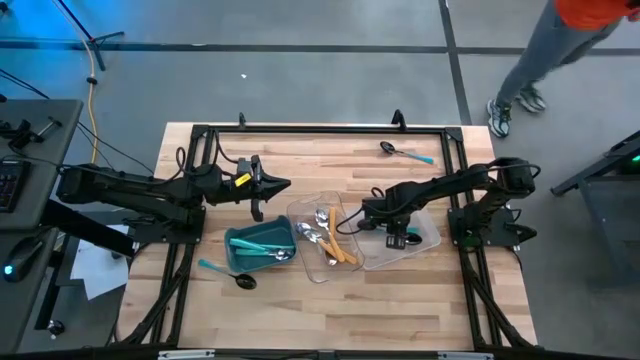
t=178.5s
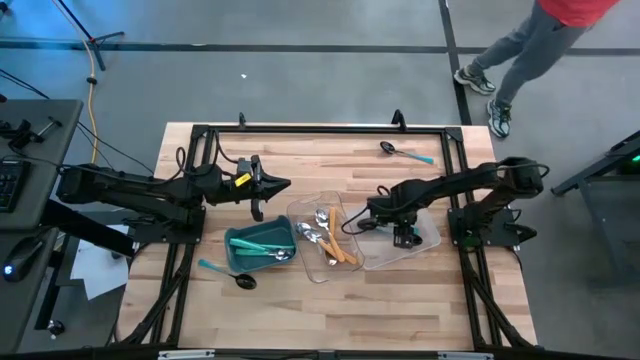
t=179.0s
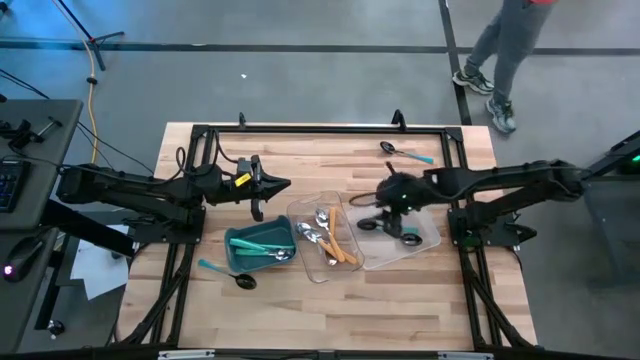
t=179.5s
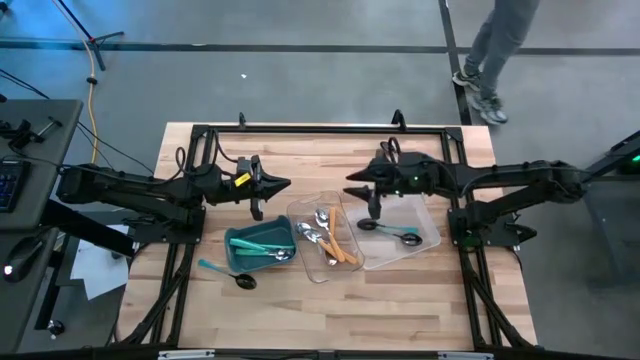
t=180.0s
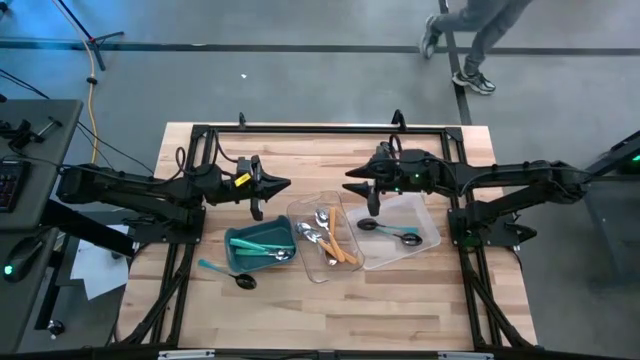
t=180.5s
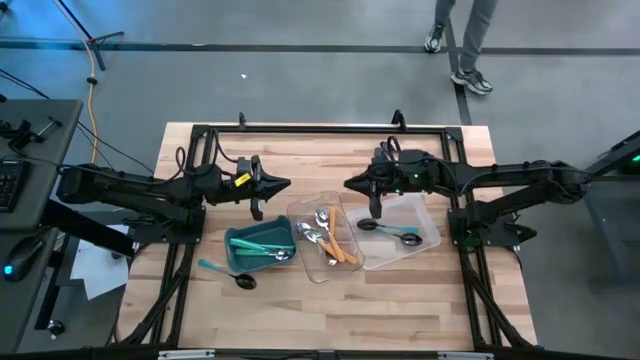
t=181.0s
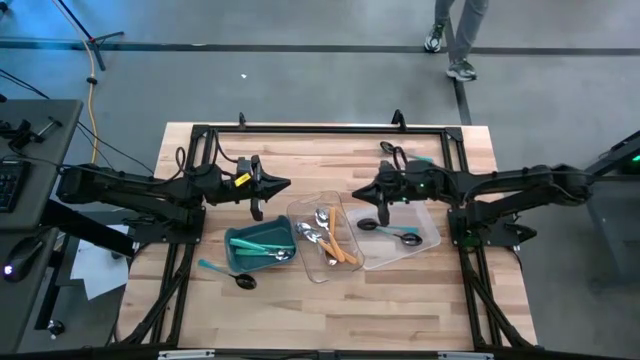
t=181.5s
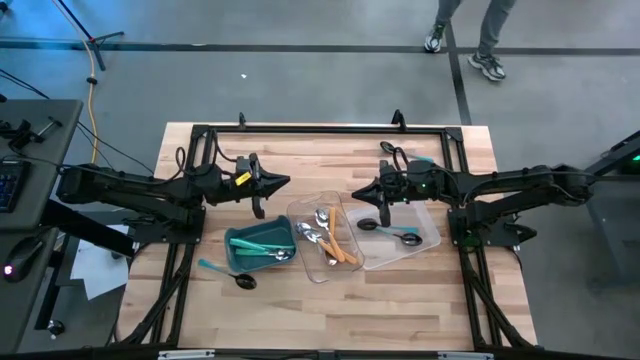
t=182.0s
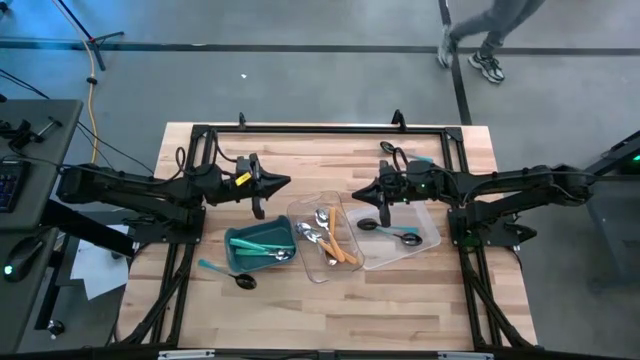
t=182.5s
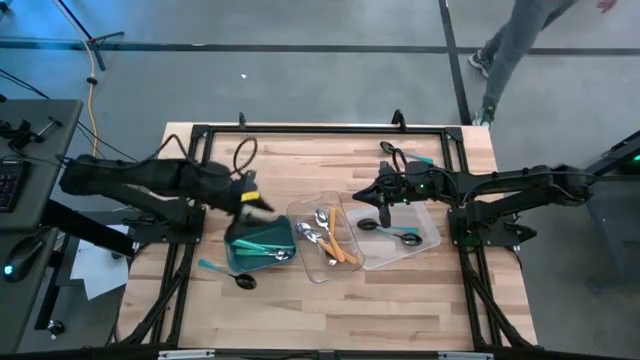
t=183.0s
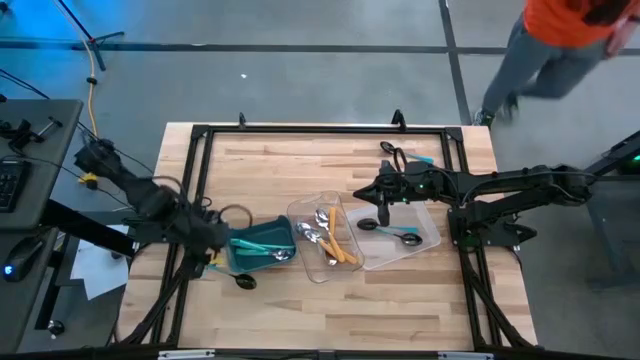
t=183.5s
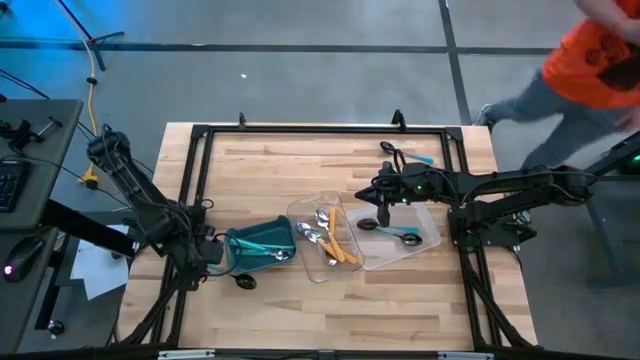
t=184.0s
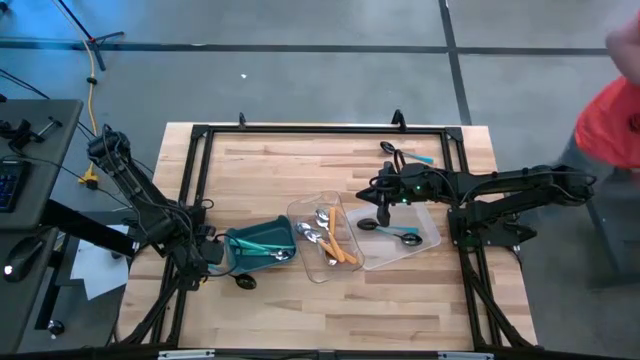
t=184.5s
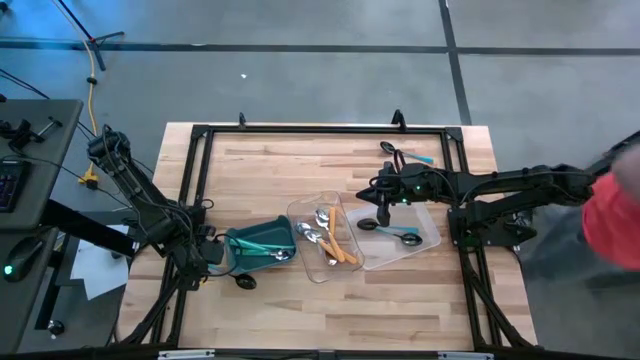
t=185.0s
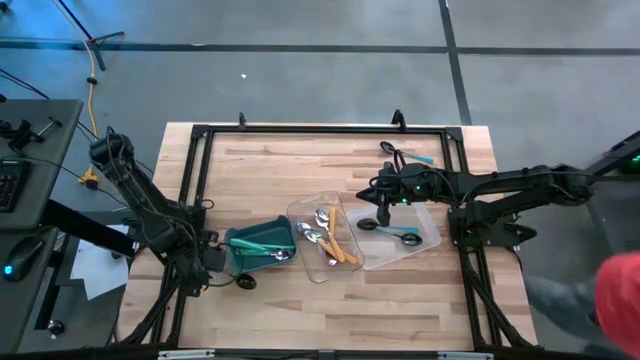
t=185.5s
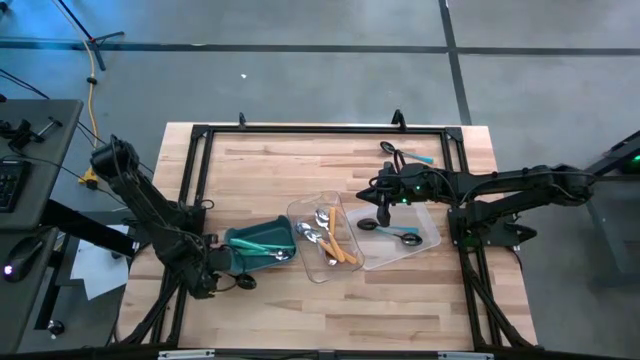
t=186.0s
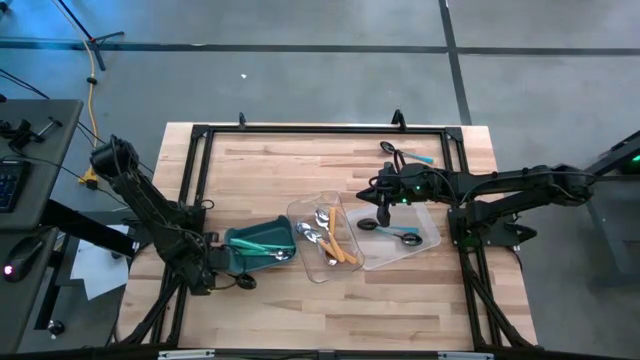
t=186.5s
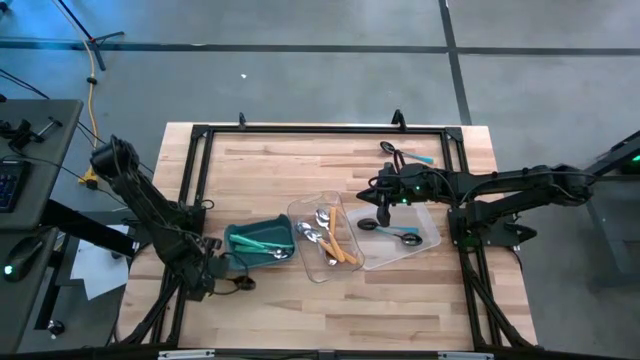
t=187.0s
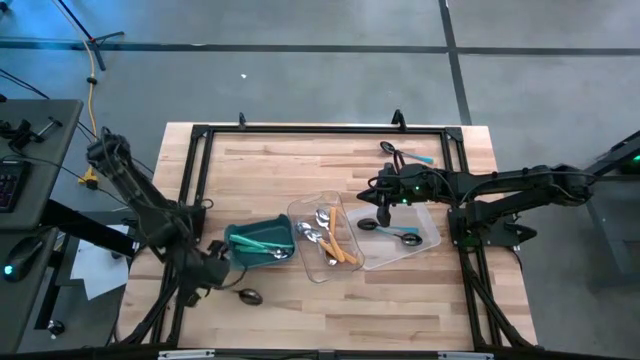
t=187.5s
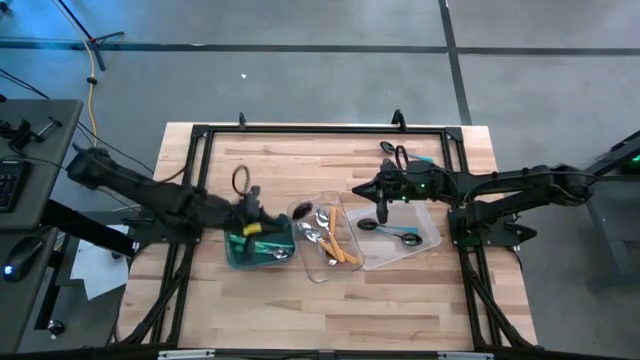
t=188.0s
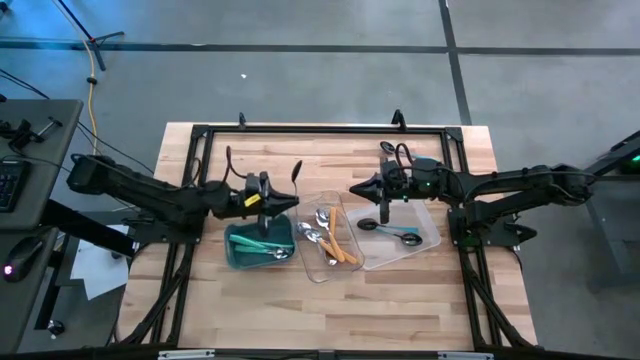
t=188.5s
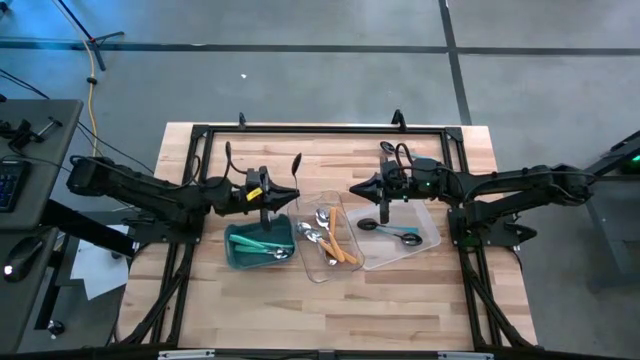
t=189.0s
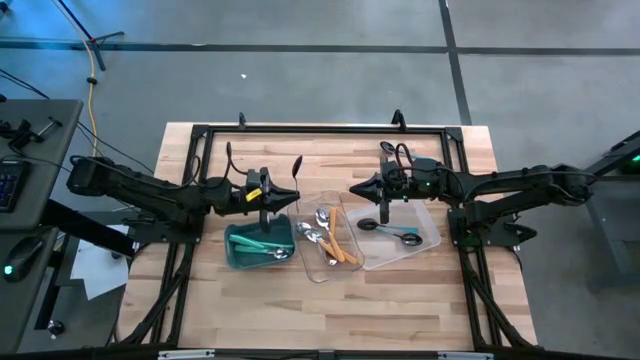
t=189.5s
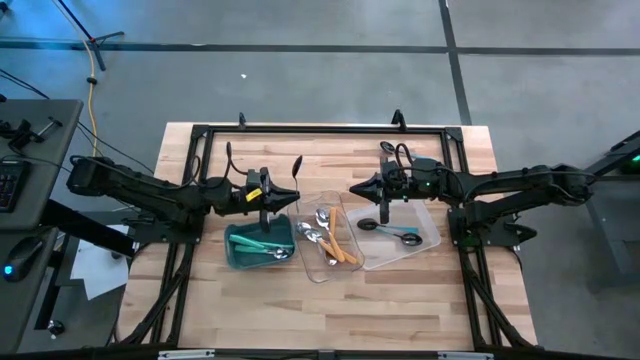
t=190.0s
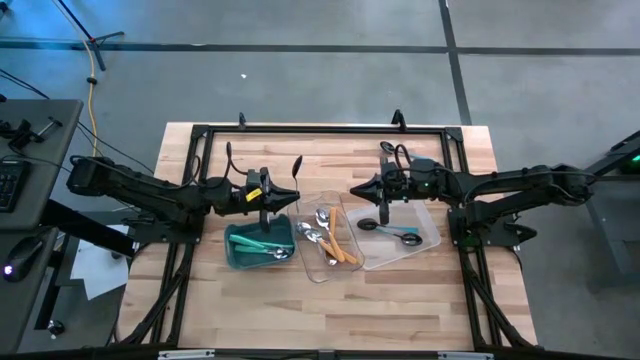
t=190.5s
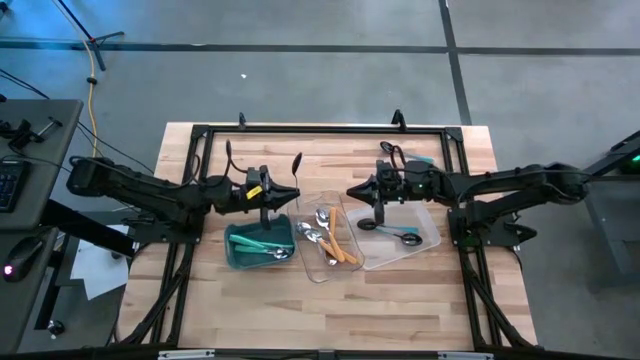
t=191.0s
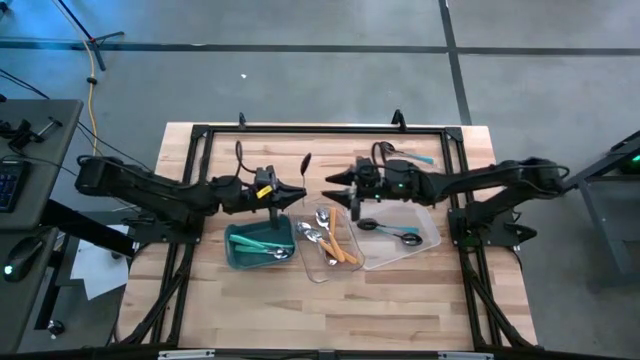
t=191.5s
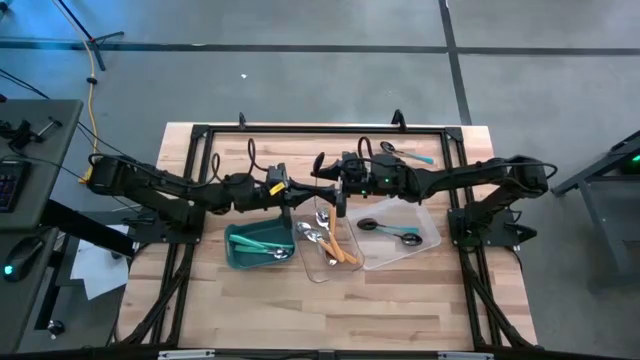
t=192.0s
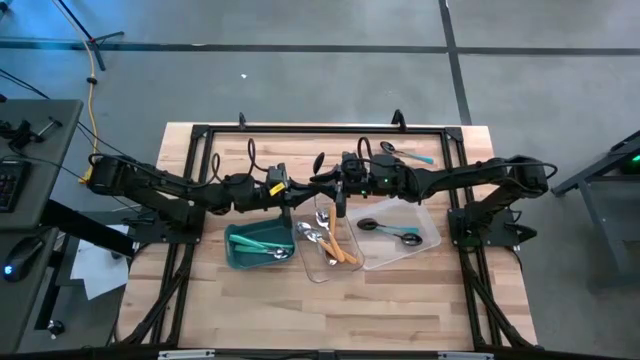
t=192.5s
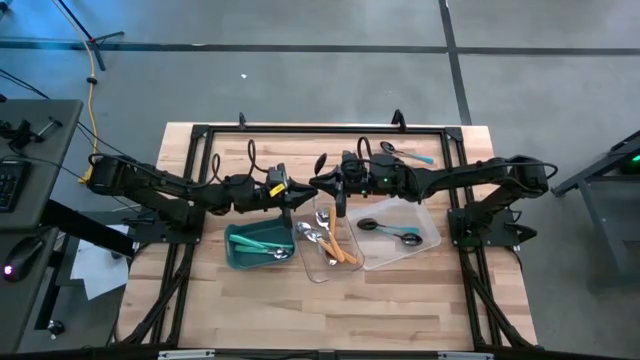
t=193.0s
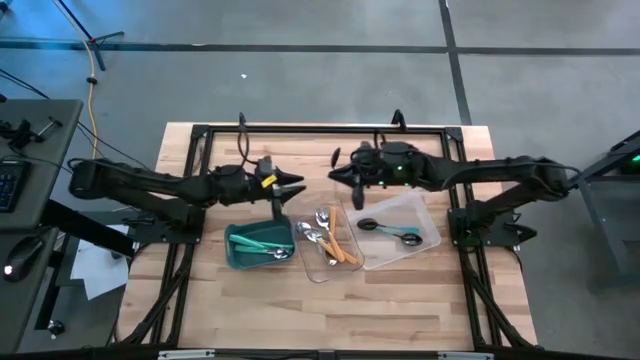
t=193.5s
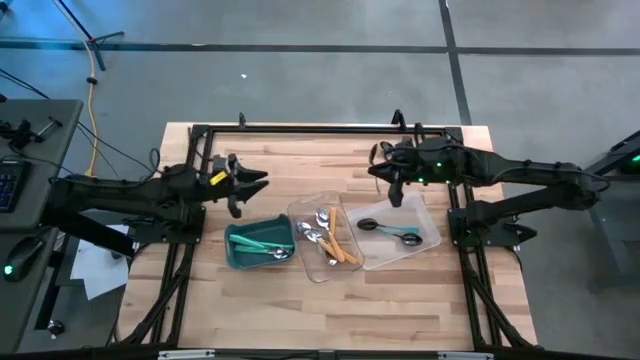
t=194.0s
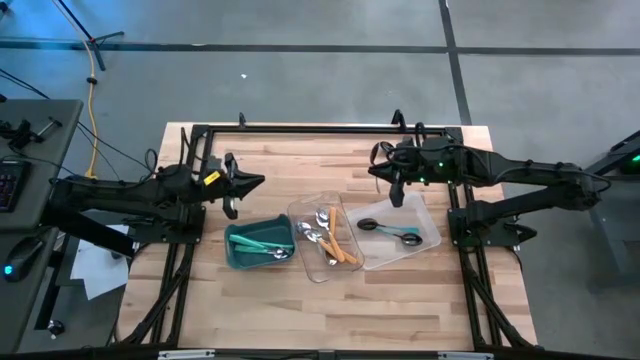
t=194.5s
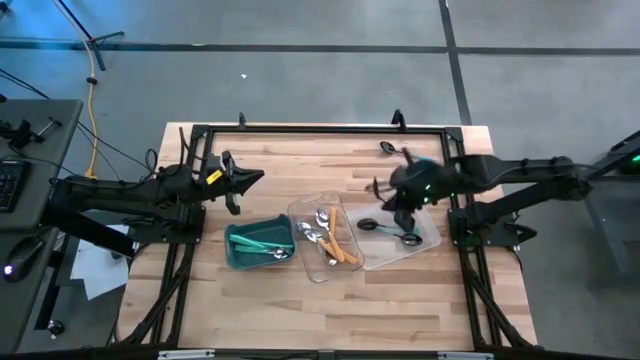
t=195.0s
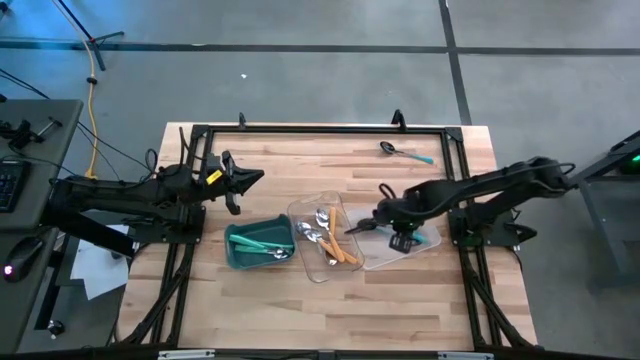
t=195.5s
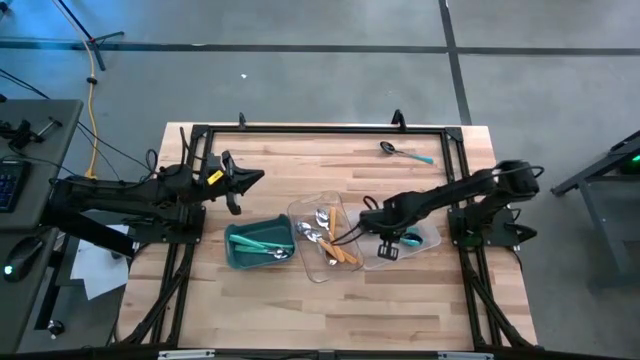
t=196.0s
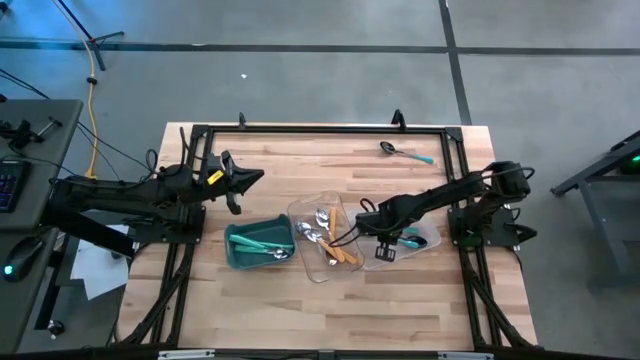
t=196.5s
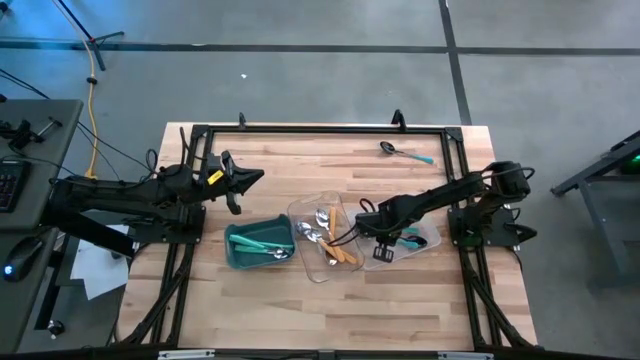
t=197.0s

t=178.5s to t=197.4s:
Task: Sort silverware by color (type)
Put the blue spoon into the white bin
